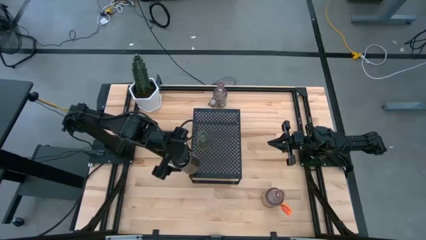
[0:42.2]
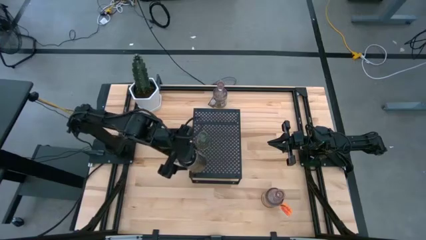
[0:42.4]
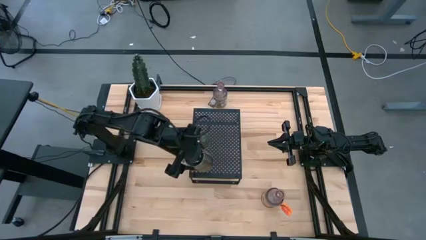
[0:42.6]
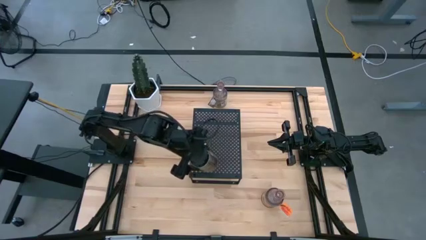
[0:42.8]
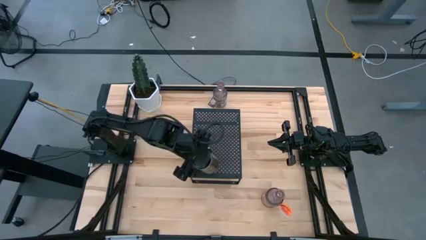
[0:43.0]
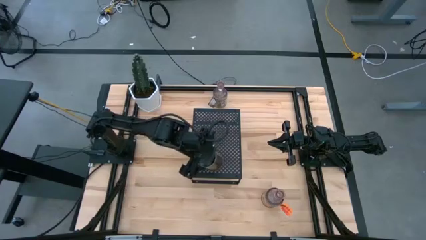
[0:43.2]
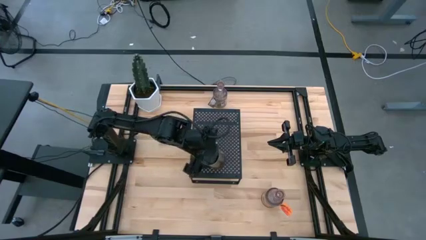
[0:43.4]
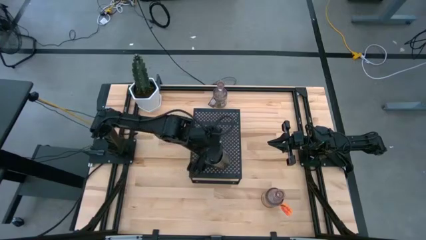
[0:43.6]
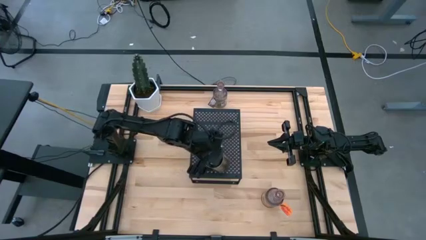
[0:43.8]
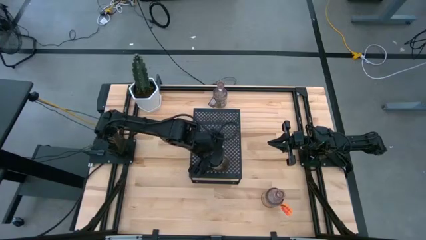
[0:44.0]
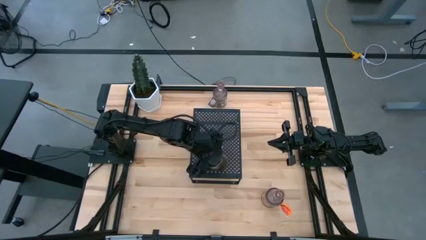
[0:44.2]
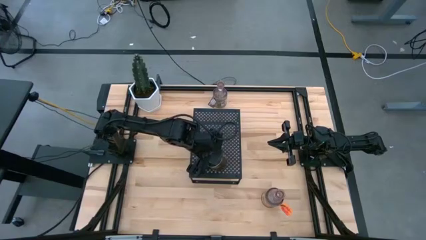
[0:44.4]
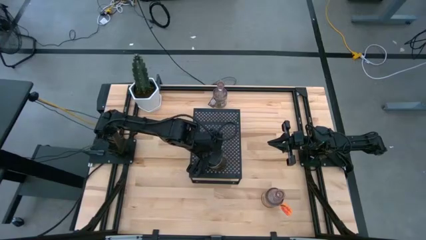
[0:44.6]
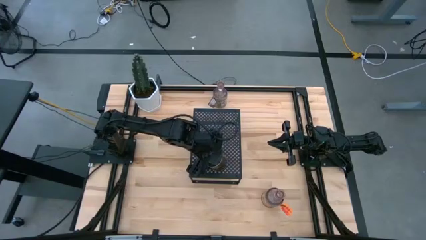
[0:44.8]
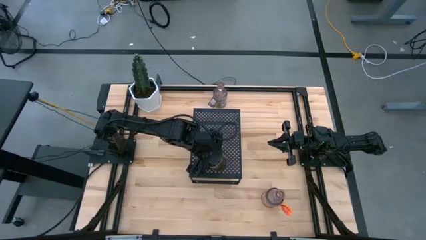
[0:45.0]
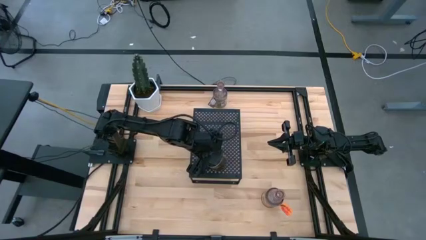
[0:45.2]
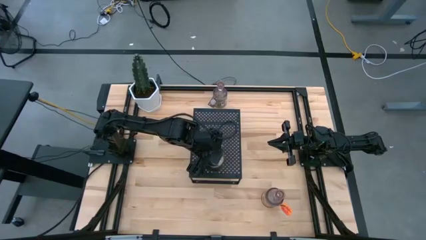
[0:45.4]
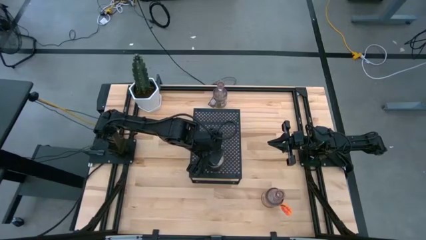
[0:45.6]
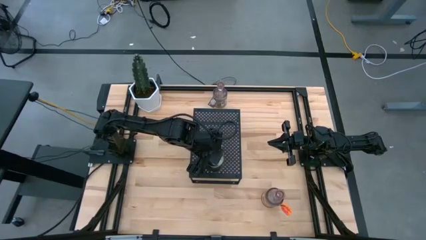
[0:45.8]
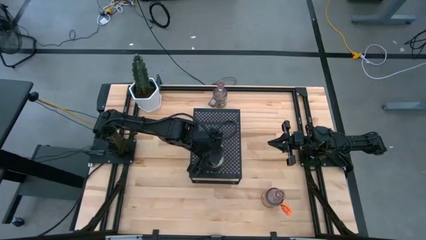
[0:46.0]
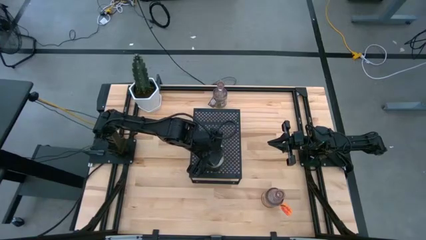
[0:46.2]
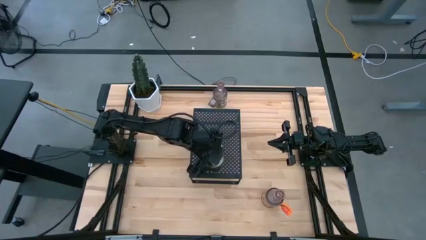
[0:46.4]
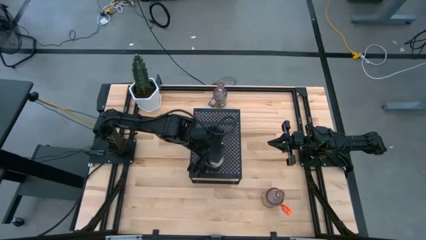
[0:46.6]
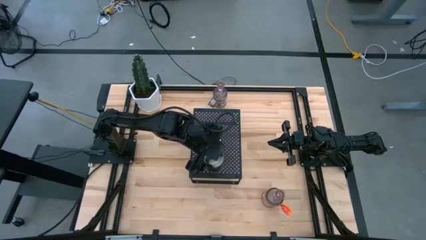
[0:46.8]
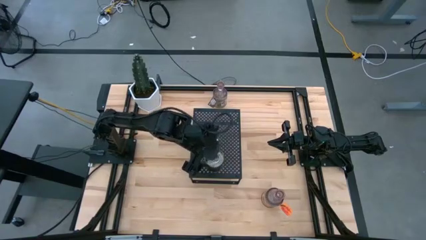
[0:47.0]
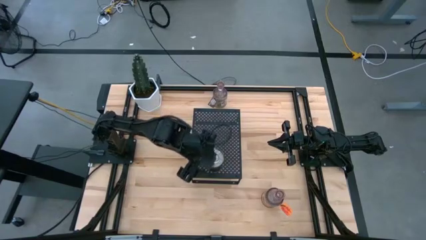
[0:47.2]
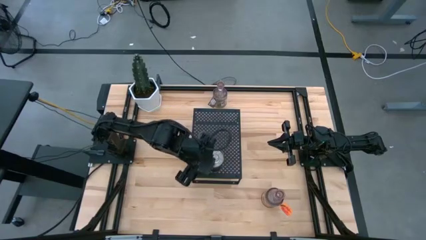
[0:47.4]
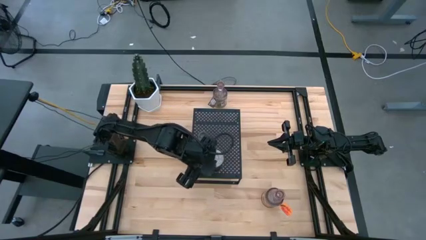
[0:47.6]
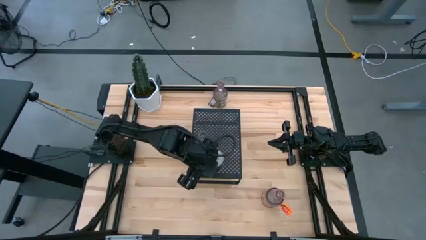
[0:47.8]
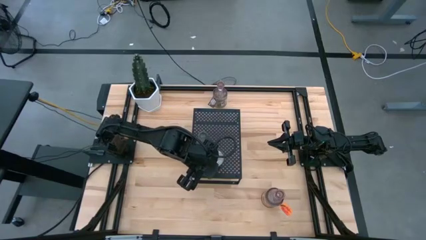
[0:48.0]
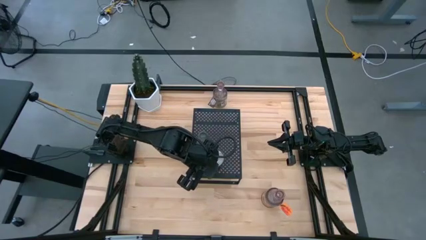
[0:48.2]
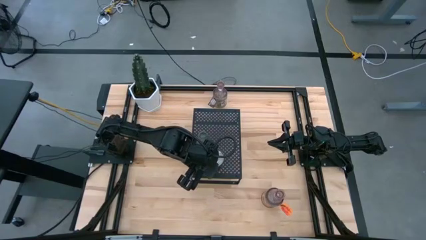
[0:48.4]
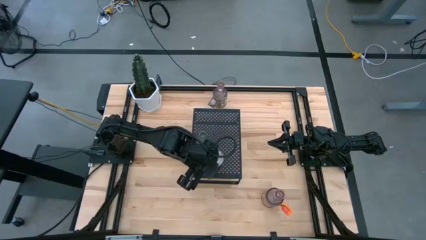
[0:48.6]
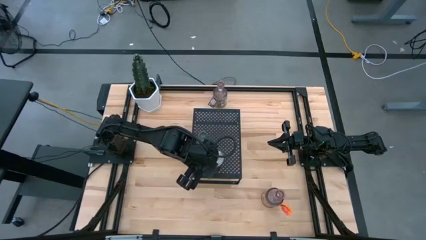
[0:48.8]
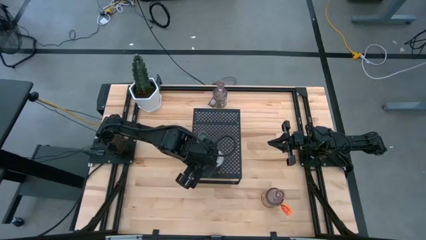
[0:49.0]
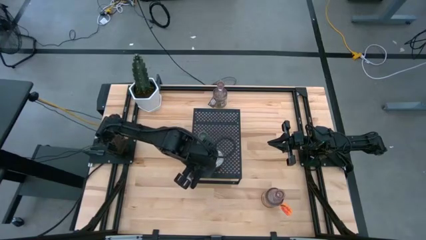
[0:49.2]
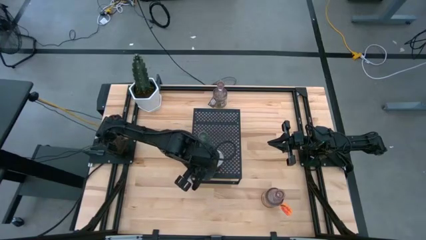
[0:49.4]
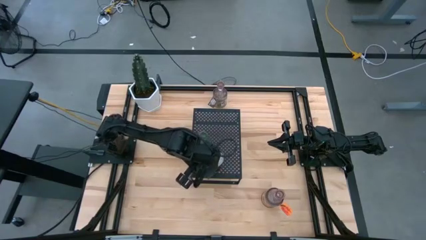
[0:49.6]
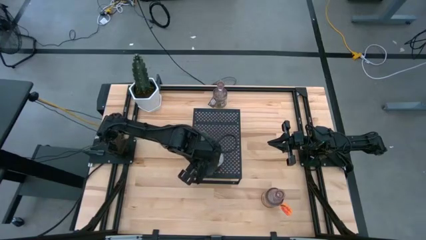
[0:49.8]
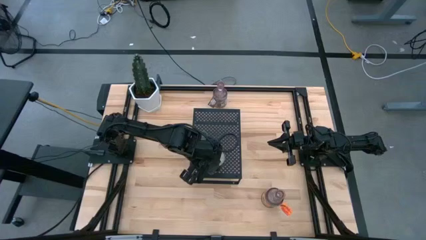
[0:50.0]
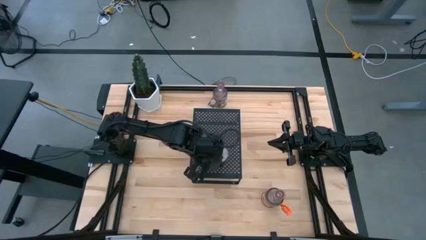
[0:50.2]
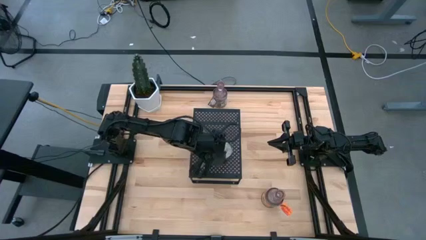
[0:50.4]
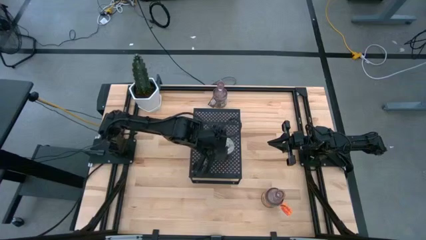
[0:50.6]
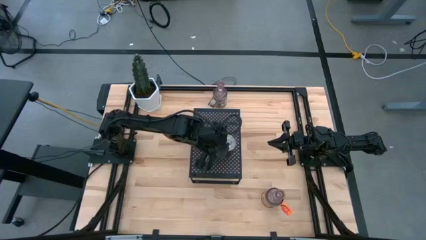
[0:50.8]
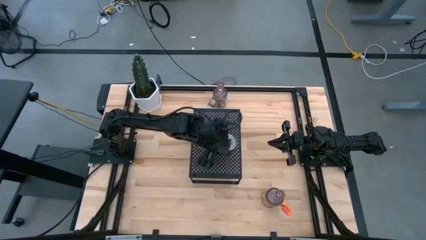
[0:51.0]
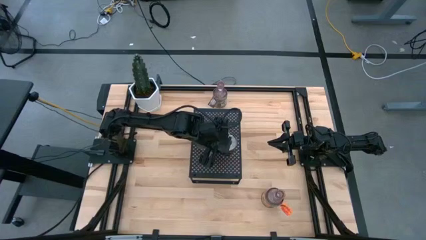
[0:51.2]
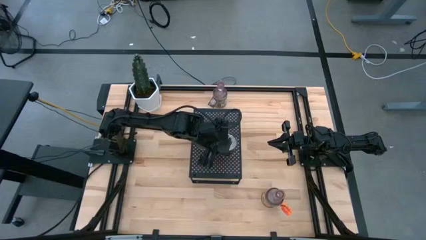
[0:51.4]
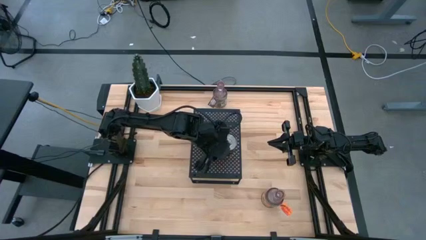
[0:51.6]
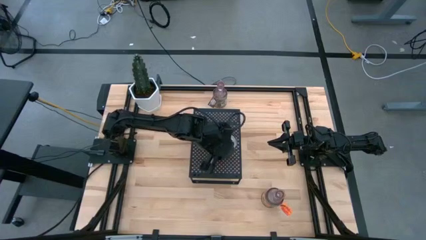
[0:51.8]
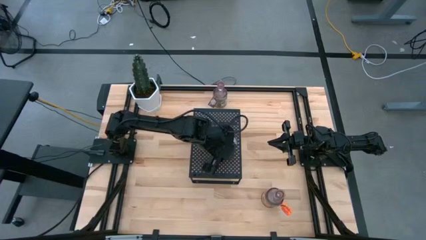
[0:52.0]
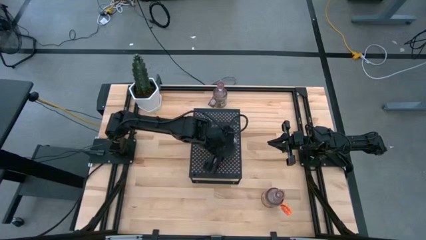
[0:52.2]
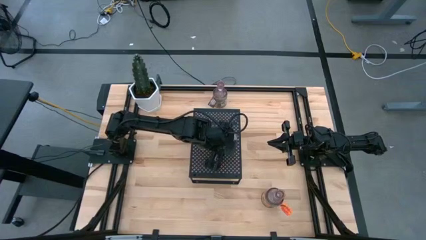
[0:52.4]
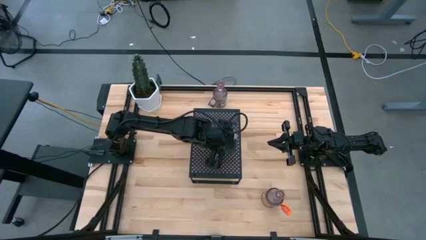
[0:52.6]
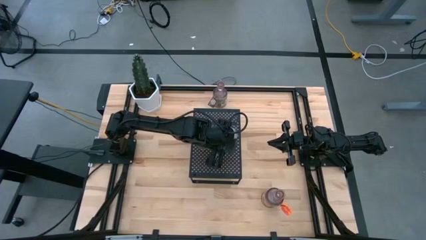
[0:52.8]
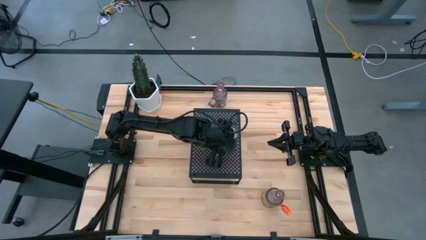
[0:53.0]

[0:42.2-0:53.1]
Task: Pick & Place candle stick holders
Put the left brown scented candle on the shelf

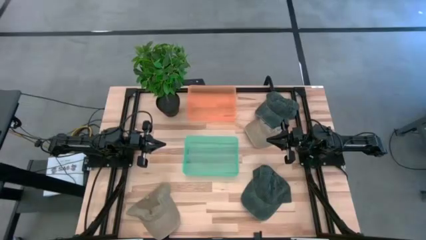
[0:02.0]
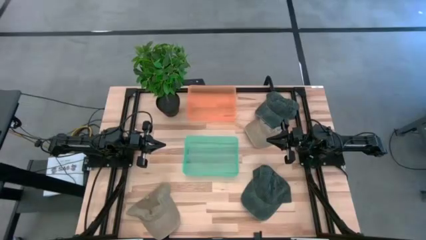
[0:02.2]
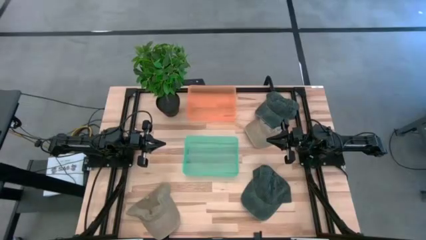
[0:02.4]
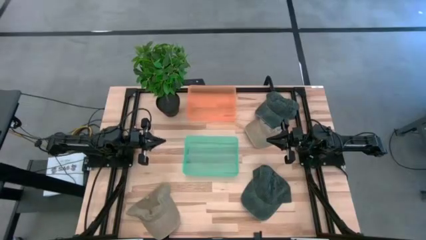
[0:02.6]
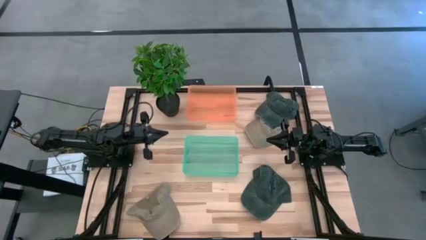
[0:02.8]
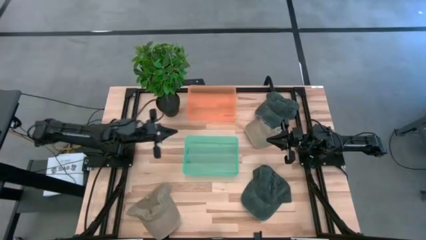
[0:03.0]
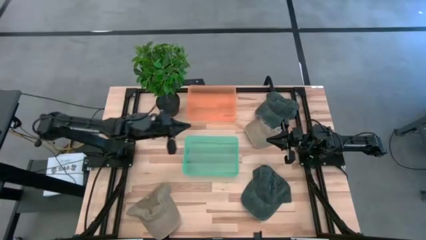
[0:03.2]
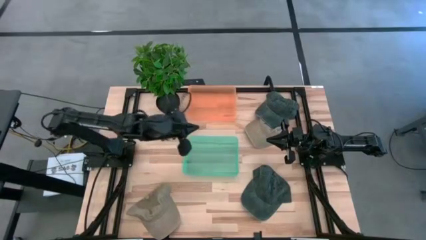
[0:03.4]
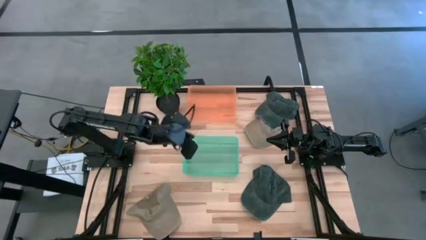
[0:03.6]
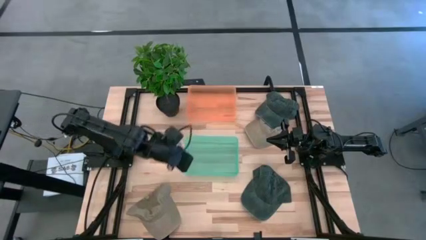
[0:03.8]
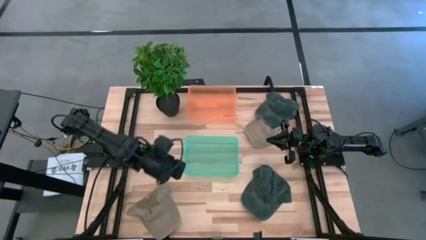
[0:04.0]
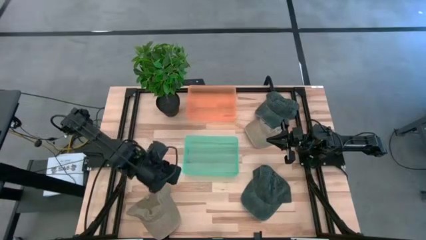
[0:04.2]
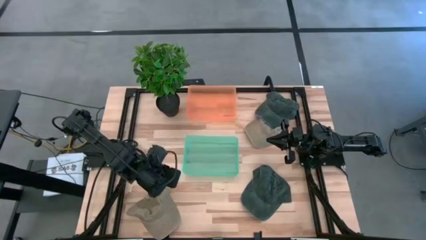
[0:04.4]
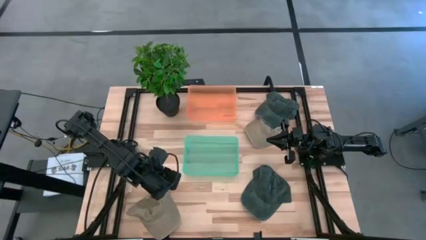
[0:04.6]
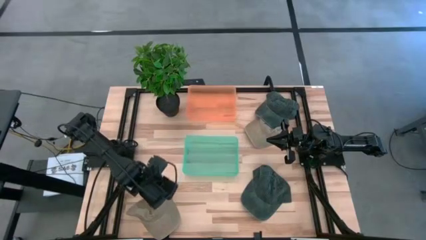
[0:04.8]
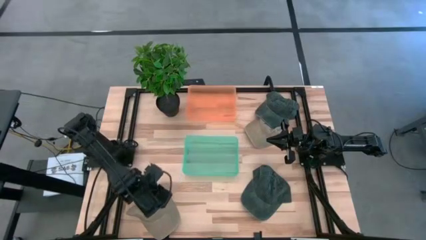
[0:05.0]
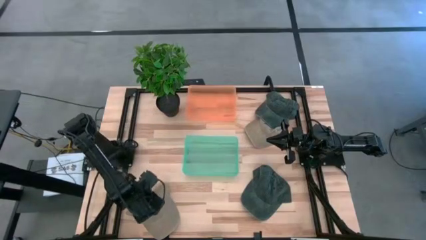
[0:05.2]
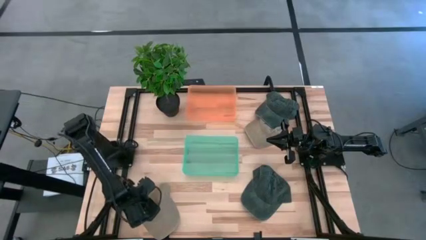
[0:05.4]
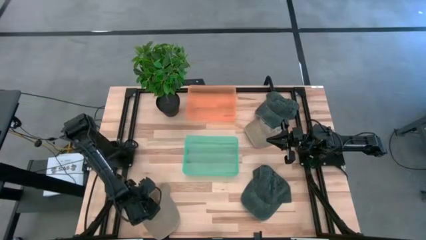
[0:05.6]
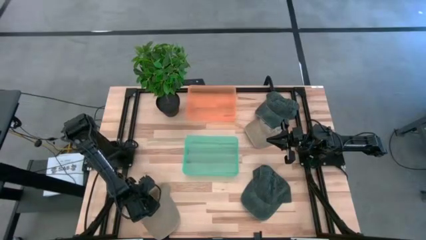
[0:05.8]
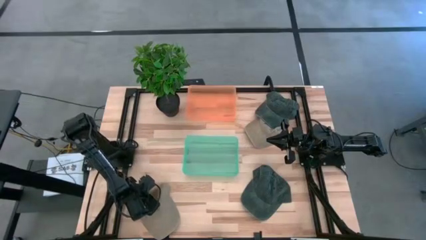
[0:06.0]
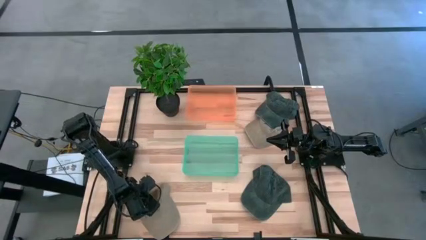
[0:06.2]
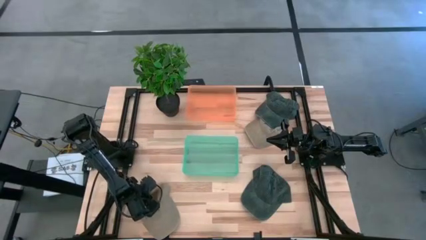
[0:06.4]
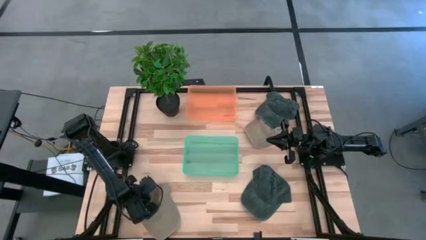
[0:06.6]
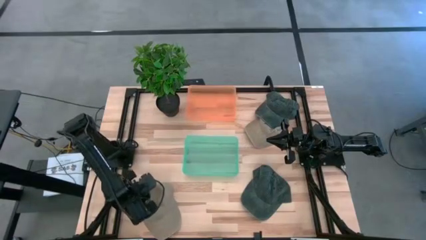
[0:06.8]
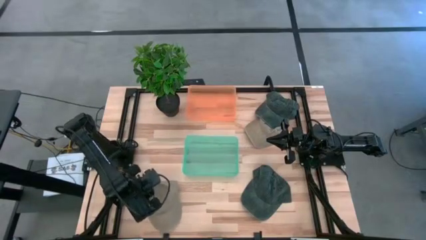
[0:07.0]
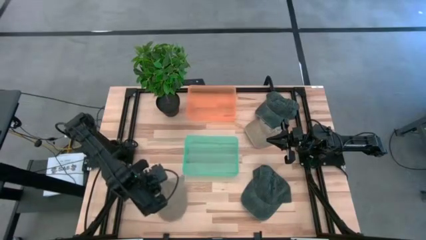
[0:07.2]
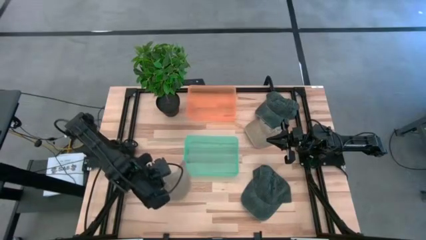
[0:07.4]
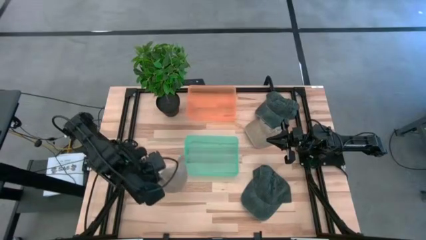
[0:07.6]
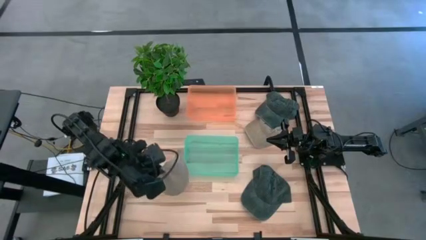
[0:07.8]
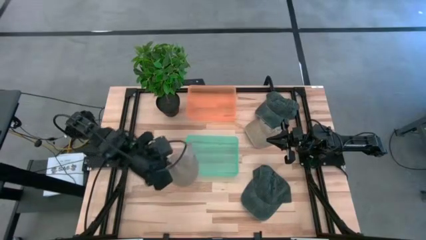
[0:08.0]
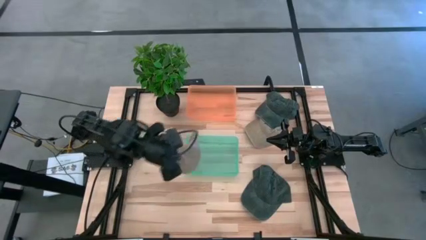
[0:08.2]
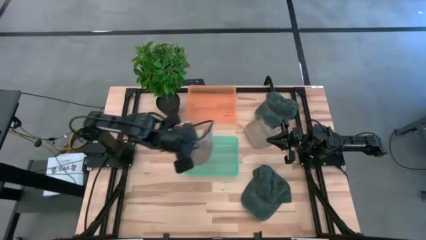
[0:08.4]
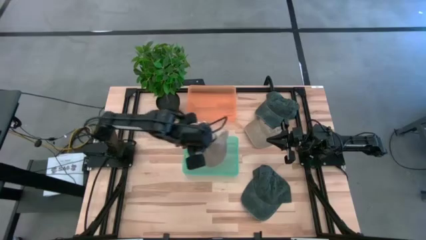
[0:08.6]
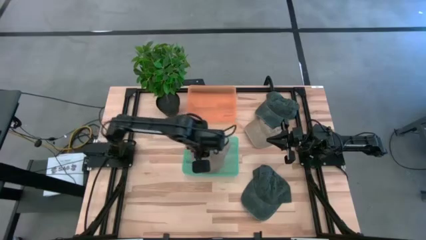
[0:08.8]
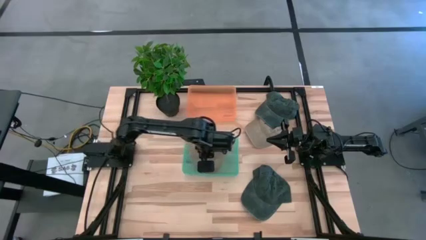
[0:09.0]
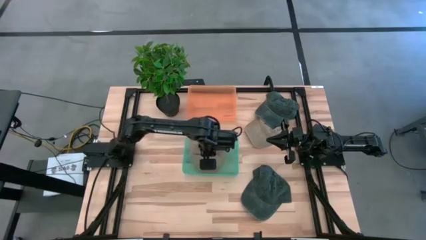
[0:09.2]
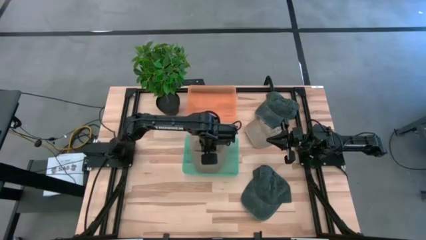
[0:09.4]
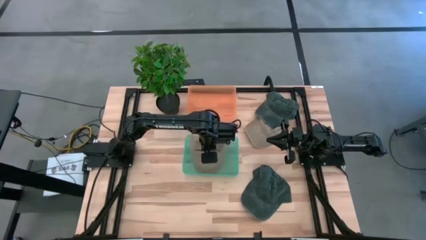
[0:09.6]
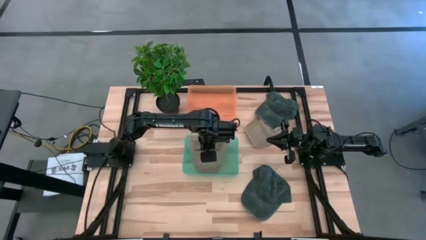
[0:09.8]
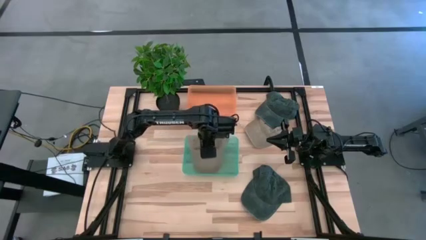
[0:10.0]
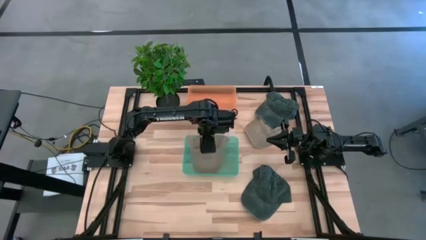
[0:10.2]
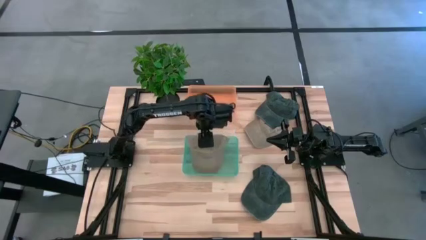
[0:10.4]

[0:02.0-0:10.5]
Task: Pick & Place hat
Put the bottom brown cap into the green bin
